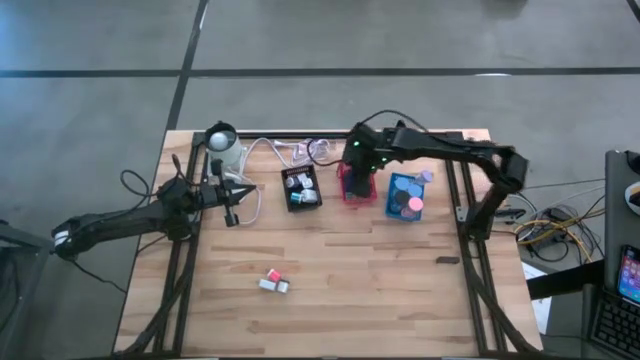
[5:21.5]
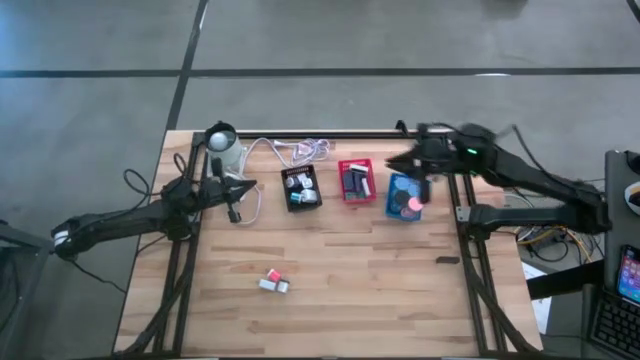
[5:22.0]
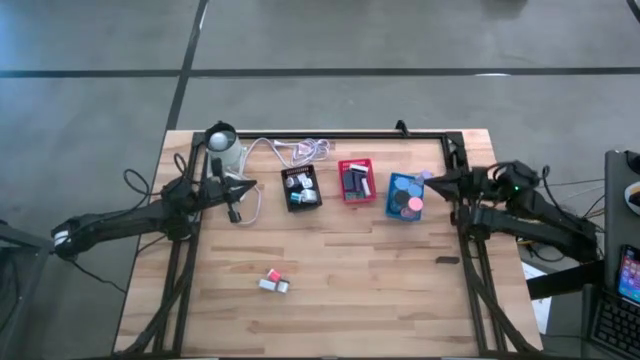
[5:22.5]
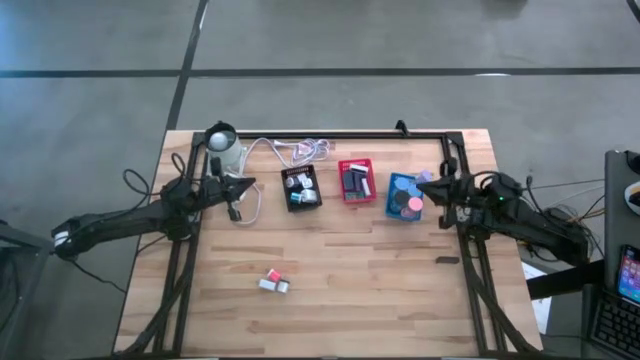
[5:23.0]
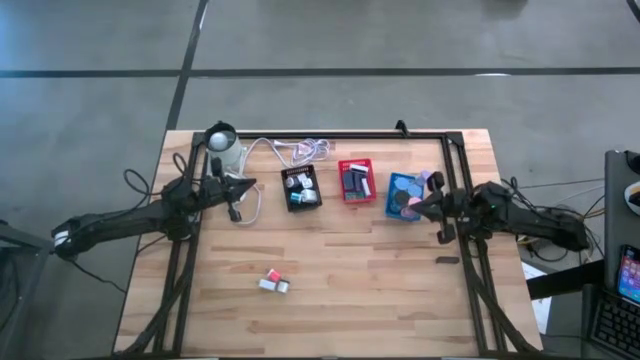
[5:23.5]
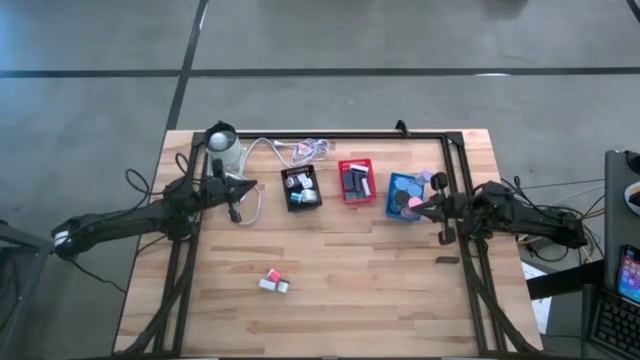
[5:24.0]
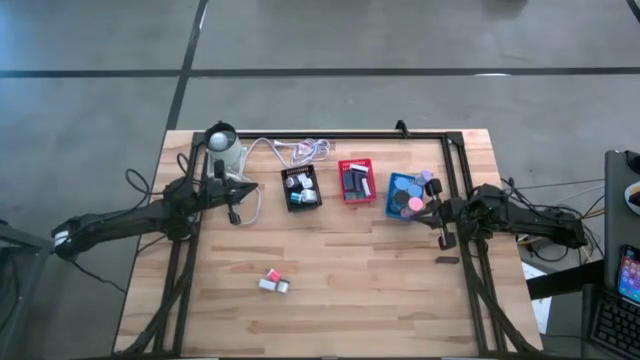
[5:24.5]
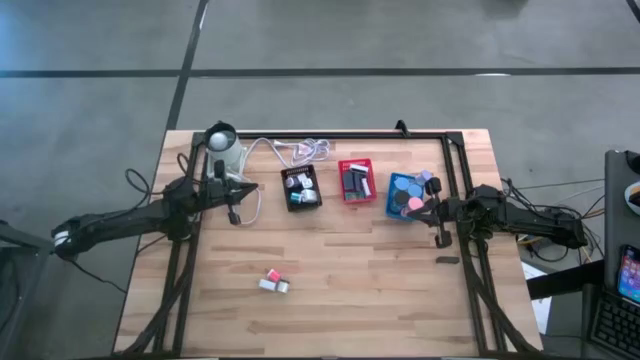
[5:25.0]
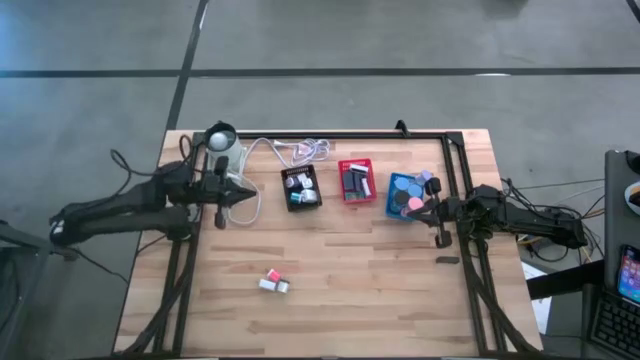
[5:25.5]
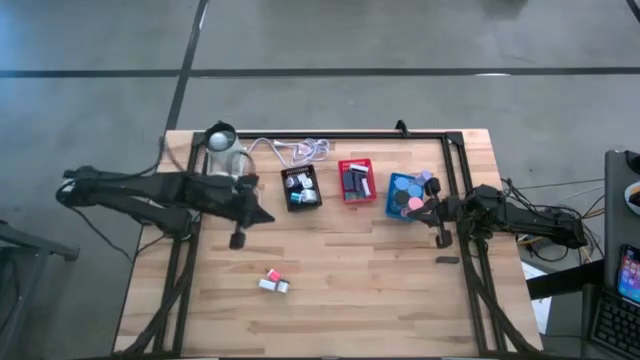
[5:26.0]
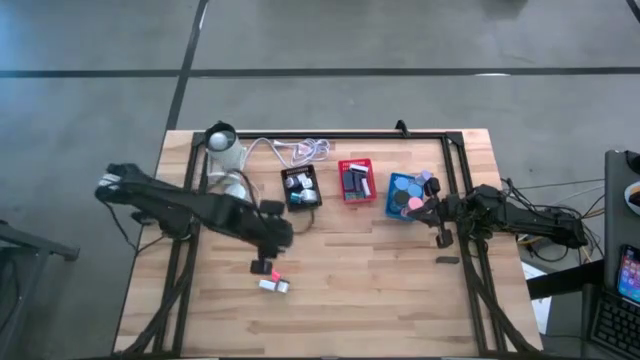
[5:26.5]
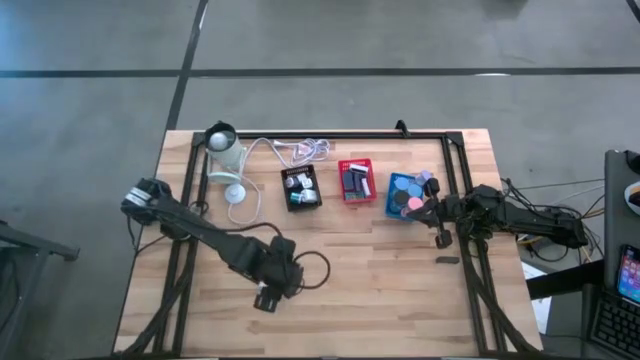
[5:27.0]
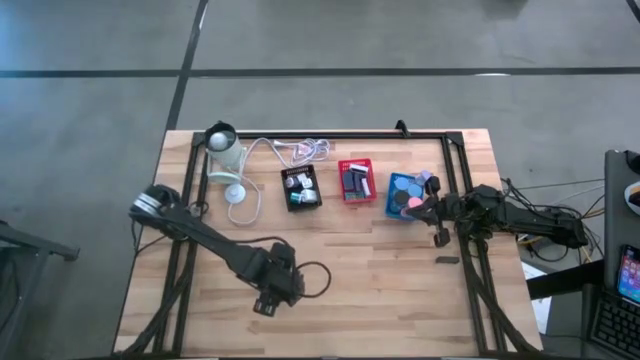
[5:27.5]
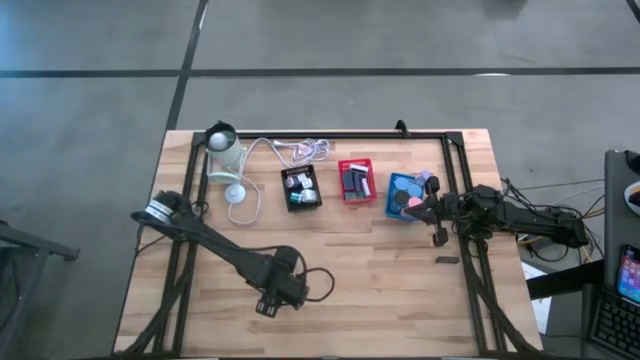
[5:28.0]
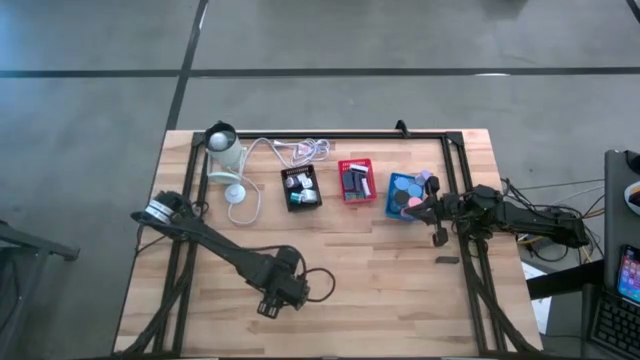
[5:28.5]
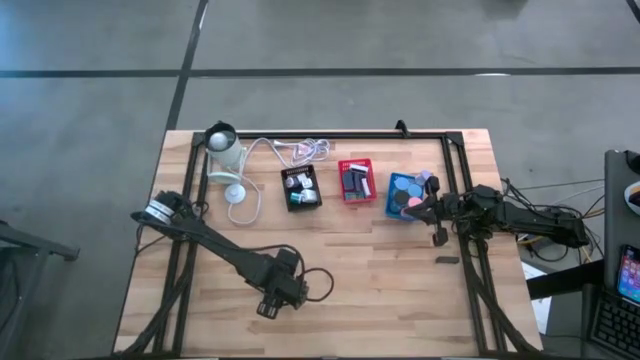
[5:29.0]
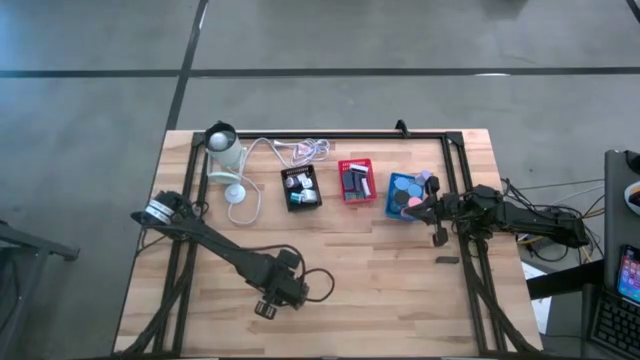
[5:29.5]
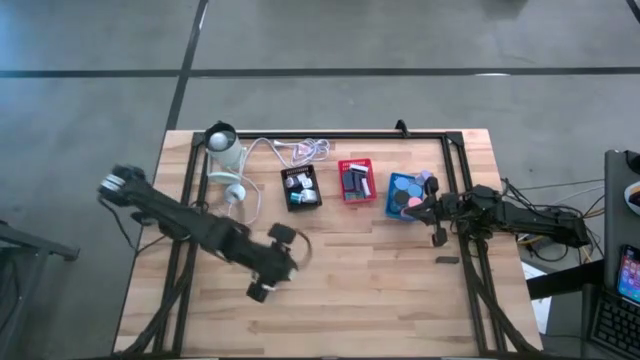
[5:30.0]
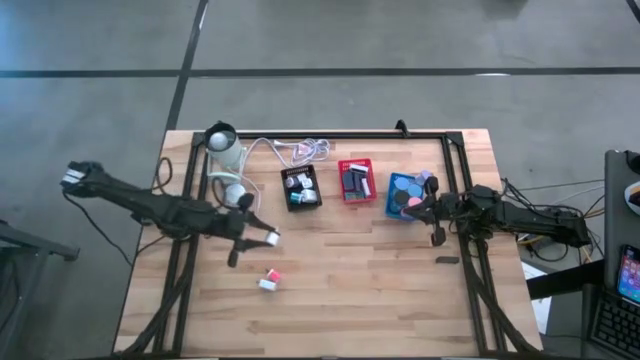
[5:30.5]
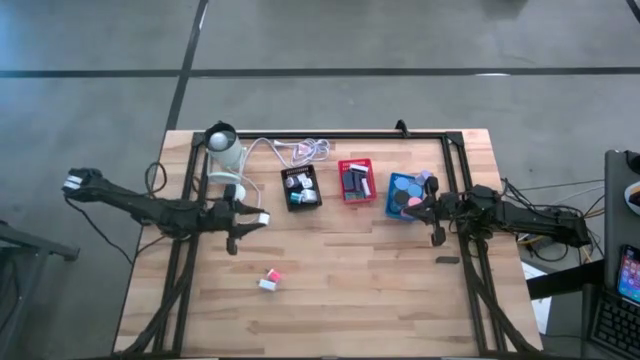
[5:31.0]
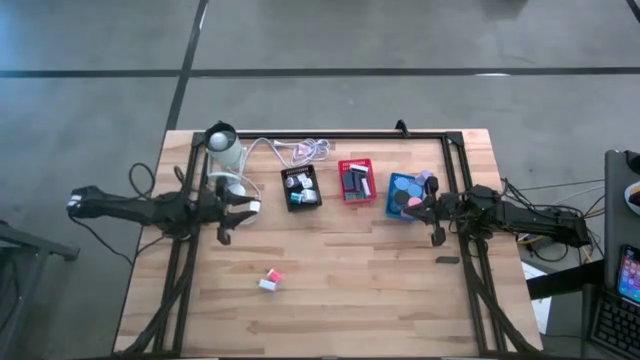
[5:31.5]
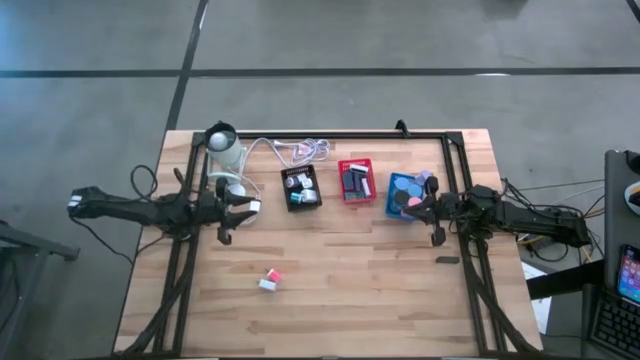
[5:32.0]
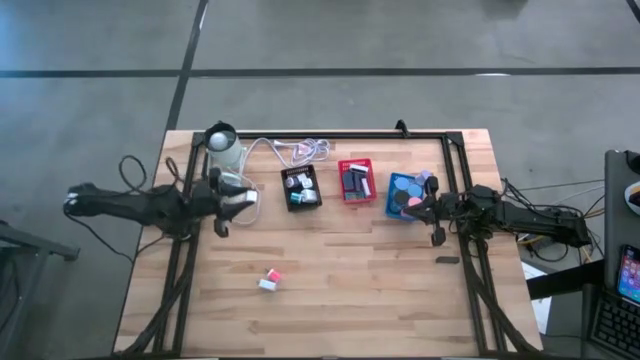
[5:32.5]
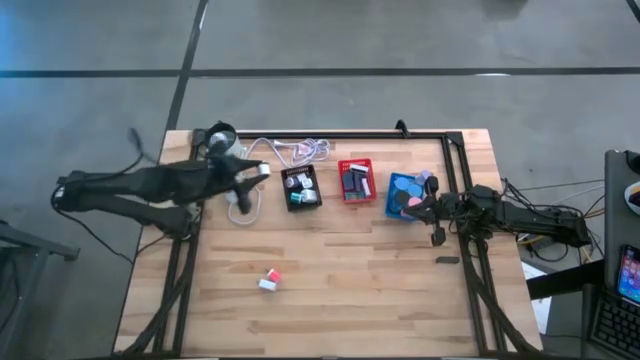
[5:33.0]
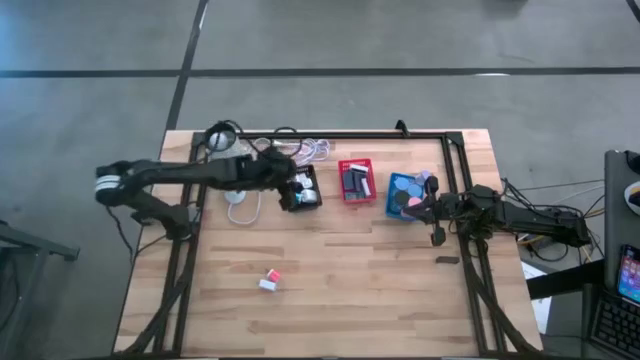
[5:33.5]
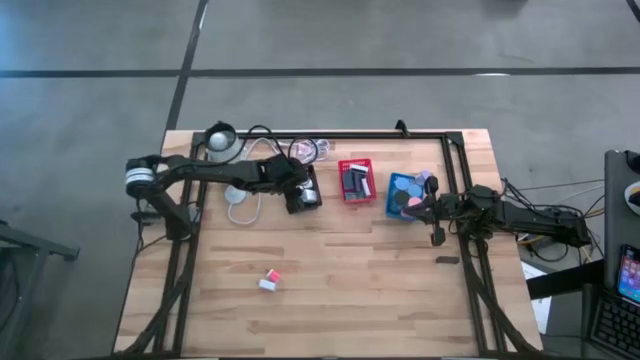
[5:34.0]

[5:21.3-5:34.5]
Task: Pick & Place Office items
Put the white black charger adapter into the black bin

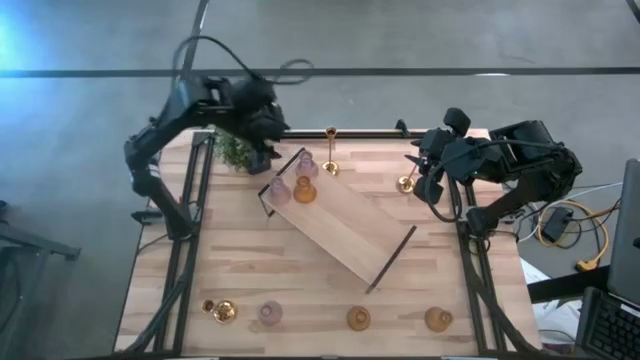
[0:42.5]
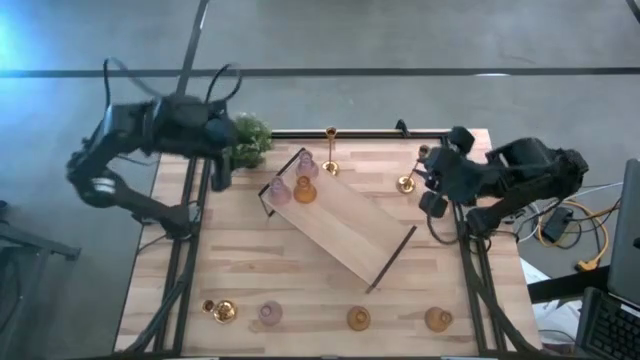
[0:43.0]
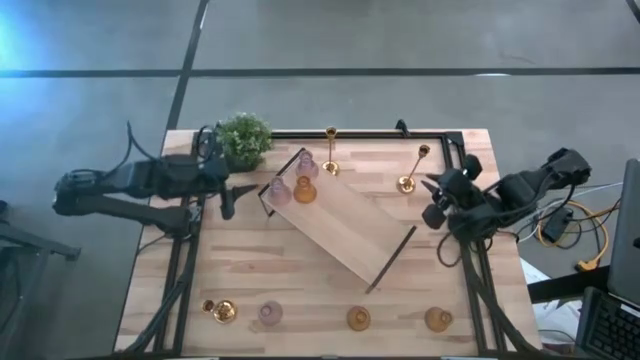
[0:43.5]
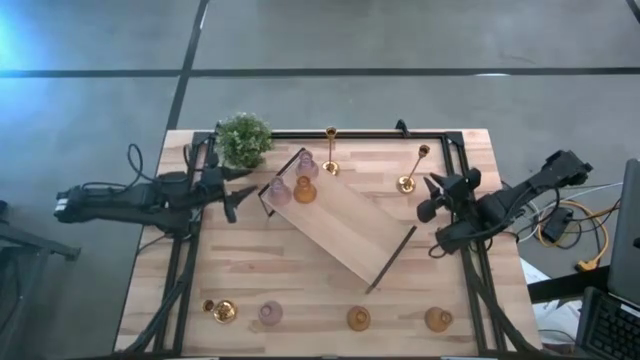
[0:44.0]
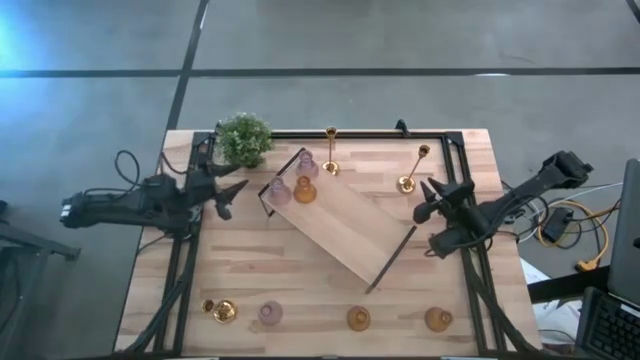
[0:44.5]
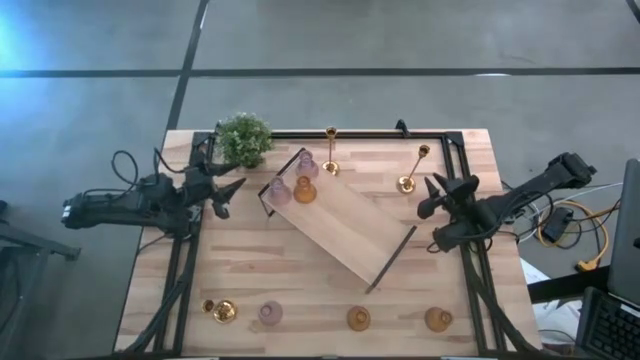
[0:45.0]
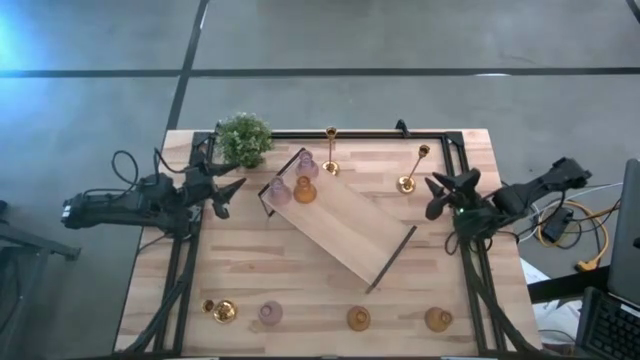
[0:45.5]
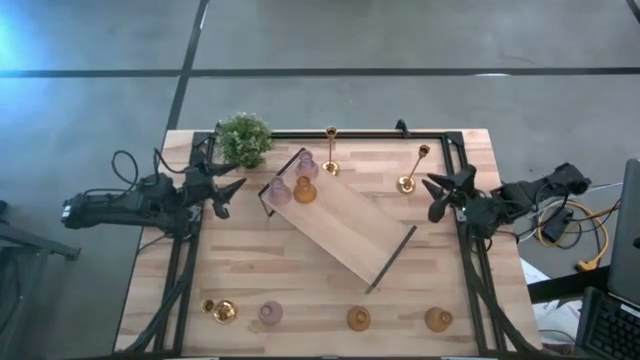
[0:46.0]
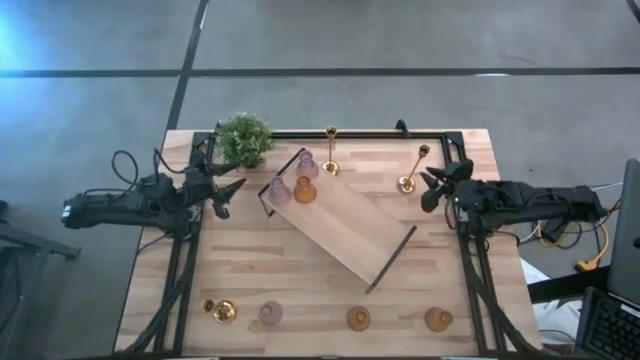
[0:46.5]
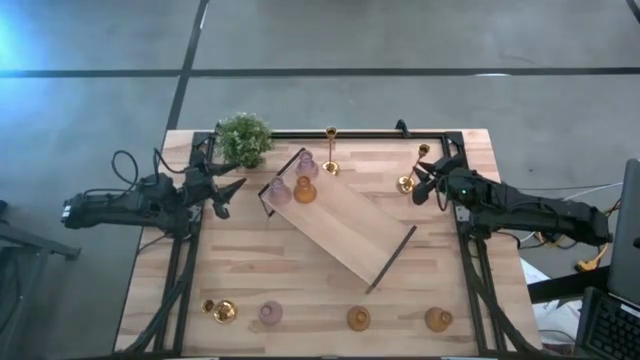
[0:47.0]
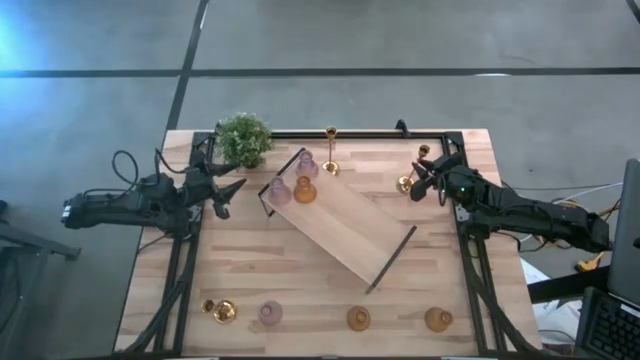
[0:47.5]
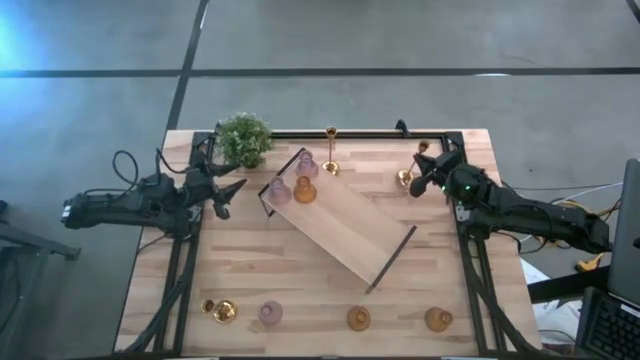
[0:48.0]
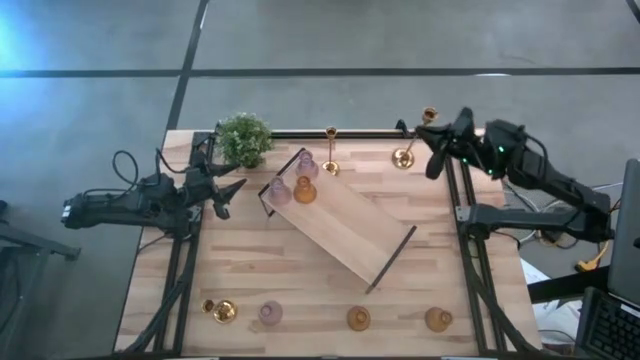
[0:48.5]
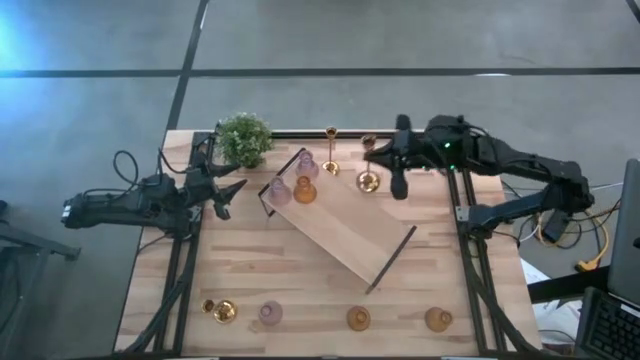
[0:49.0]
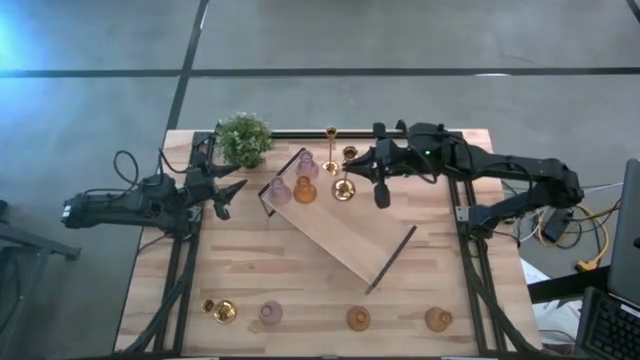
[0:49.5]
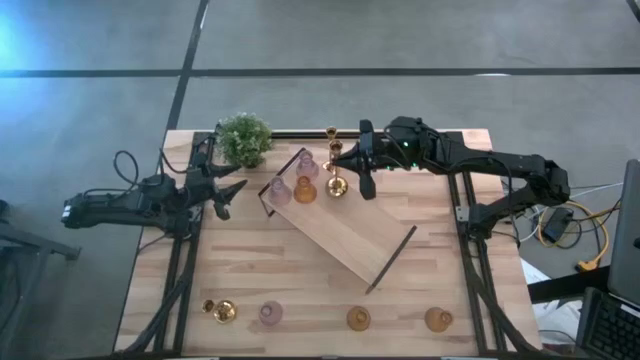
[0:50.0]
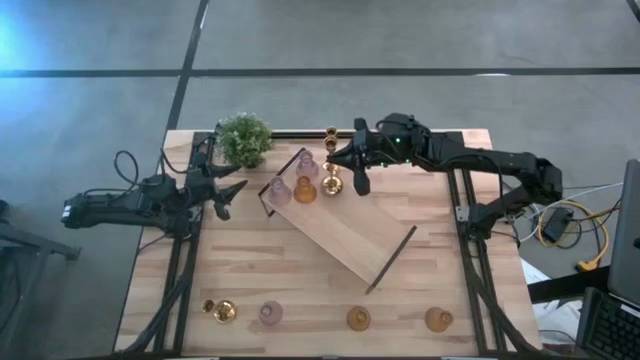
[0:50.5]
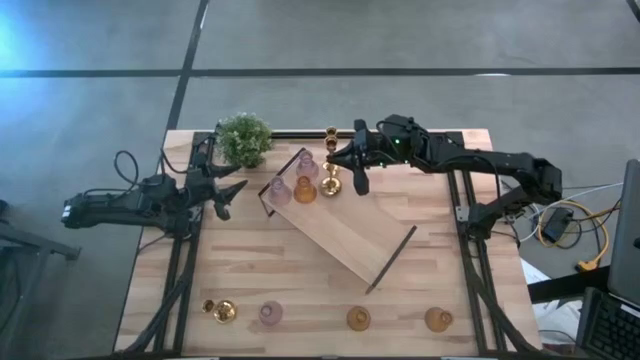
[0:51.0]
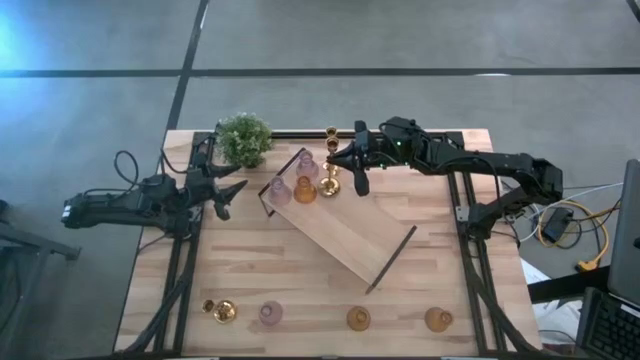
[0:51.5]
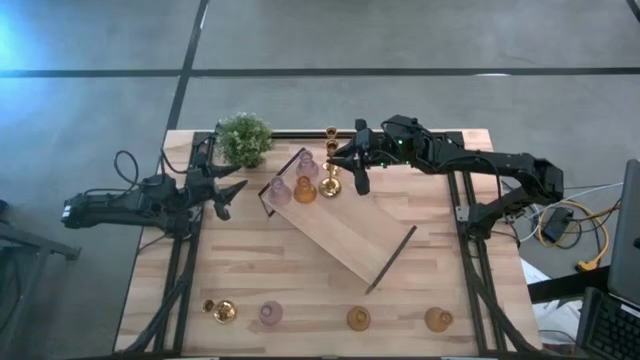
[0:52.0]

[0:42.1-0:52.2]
Task: Pick & Place candle stick holders
Put the top right gold candle holder on the shelf
